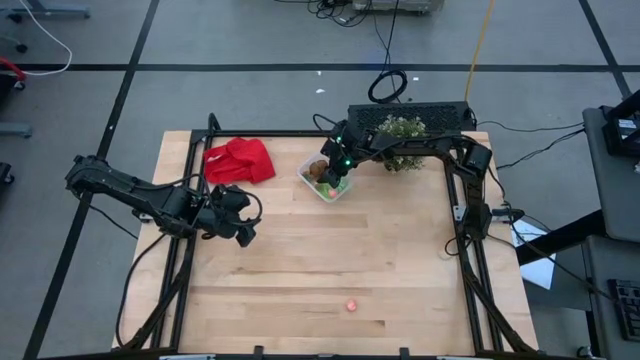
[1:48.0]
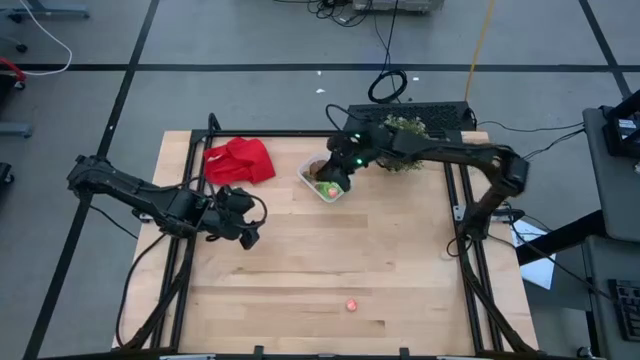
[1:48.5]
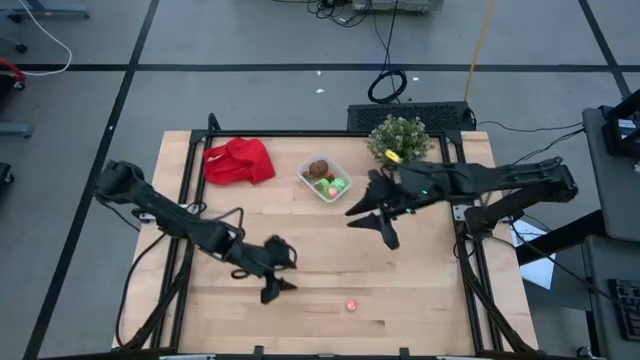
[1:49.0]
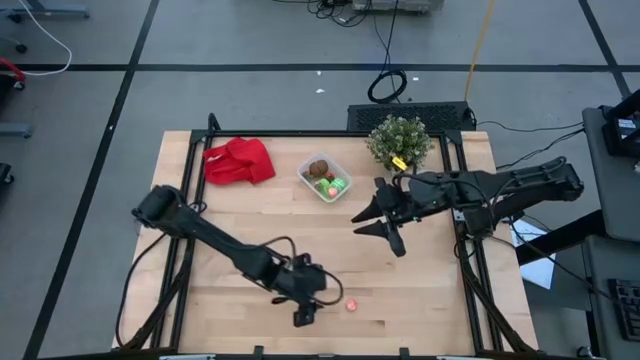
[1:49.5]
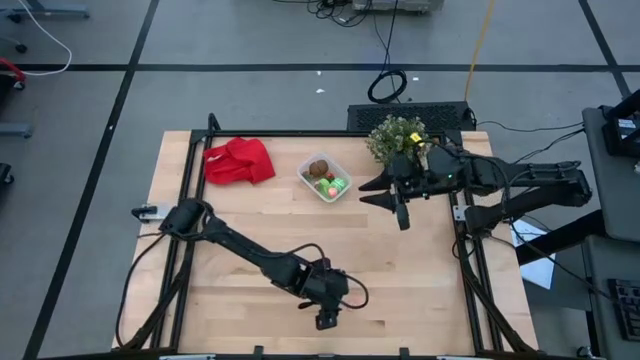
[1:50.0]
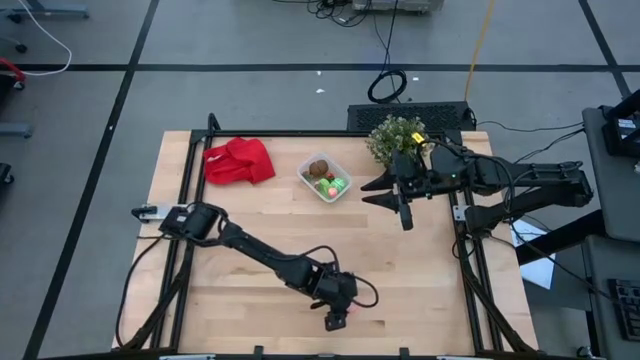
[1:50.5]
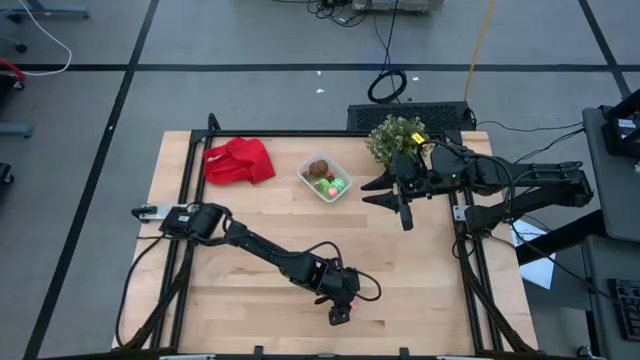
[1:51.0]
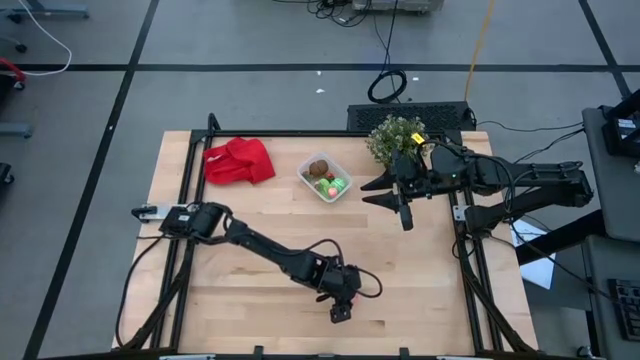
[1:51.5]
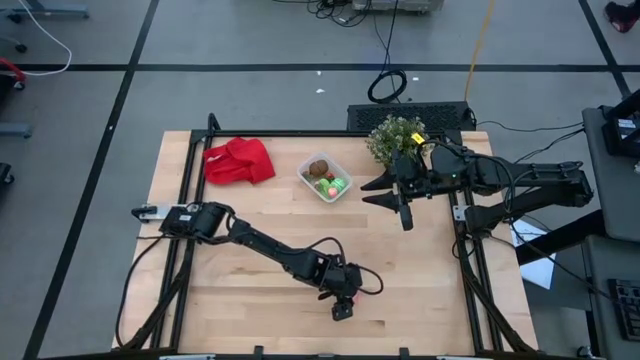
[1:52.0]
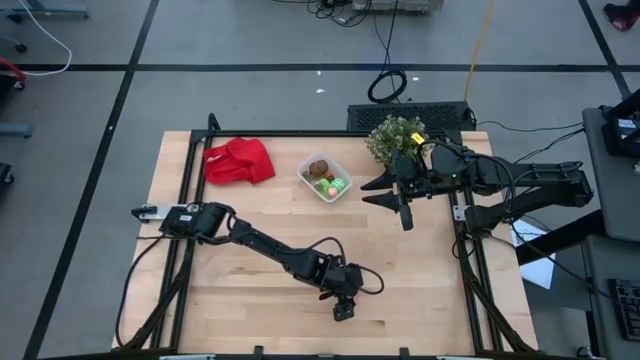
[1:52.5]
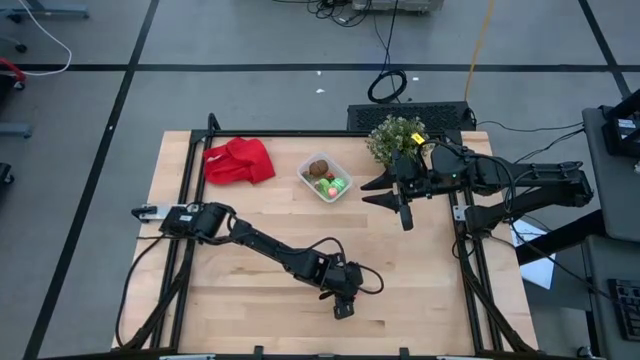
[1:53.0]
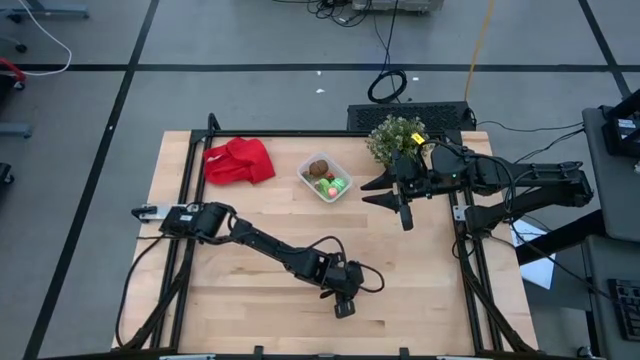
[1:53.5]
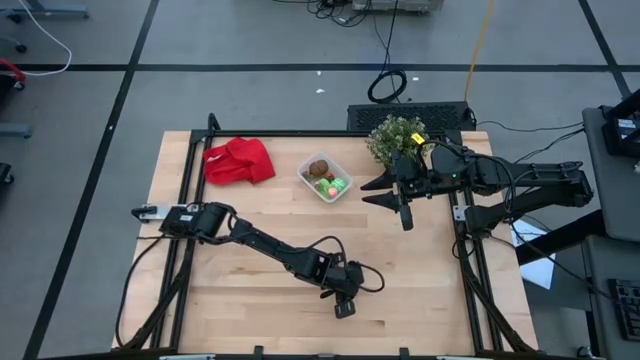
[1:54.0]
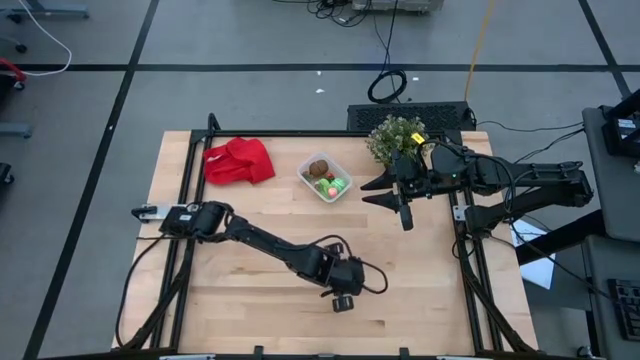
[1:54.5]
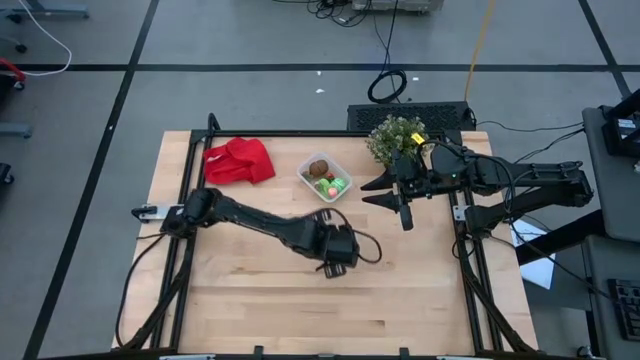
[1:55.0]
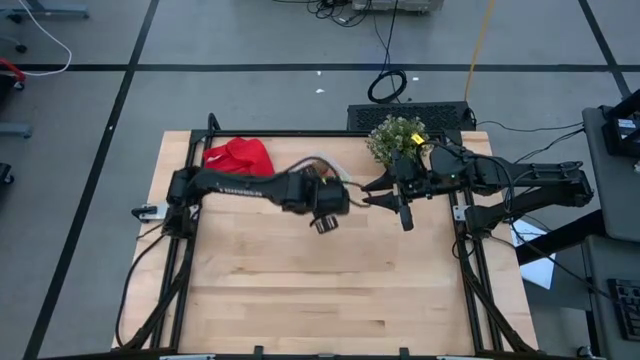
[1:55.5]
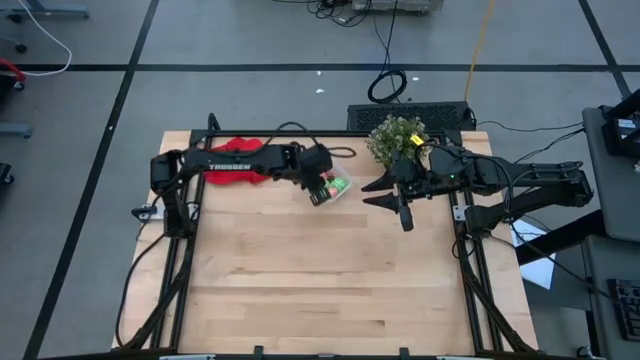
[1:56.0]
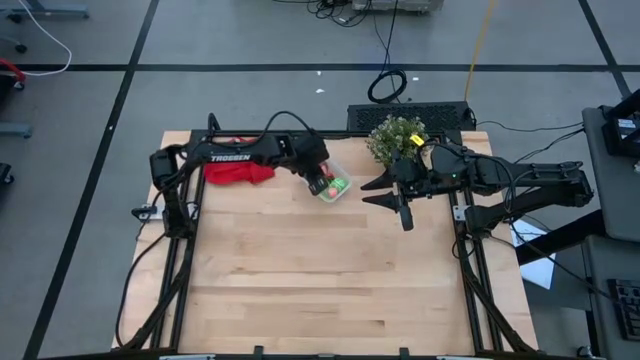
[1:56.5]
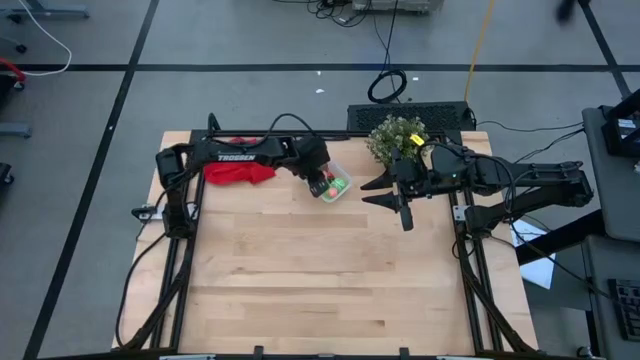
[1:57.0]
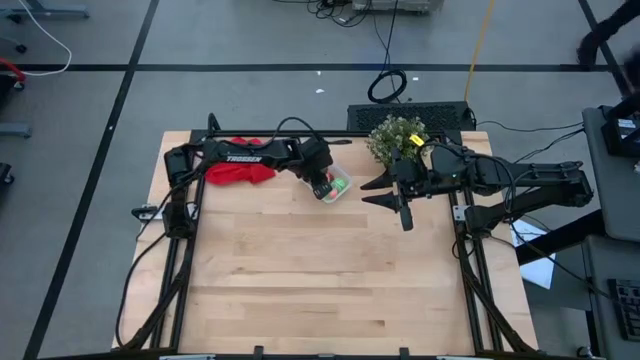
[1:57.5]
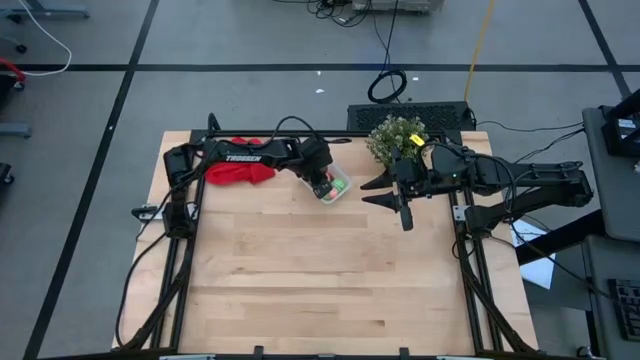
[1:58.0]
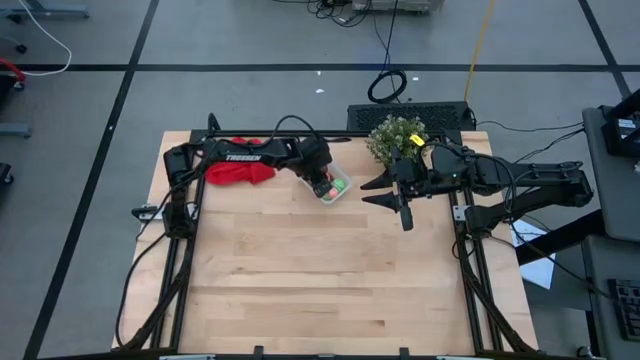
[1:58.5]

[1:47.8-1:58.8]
Task: Pick and placing Produce into tupperware
Put the pink peach into the transparent bin

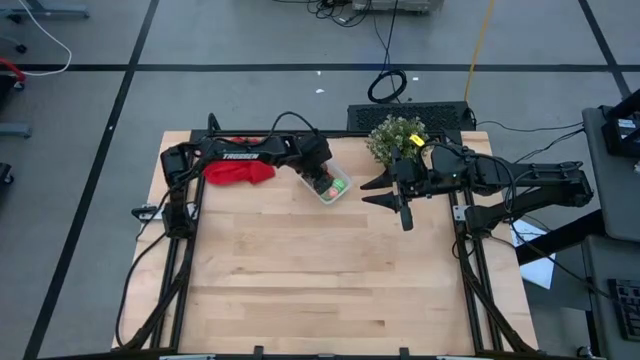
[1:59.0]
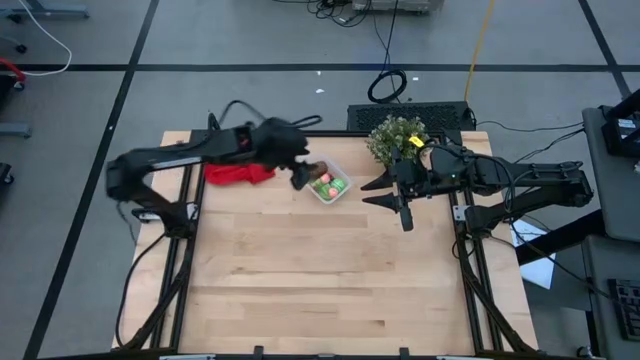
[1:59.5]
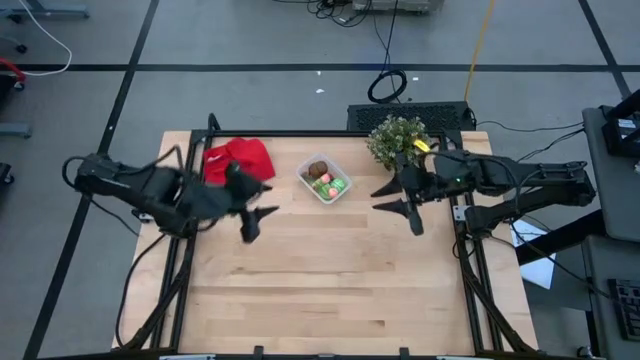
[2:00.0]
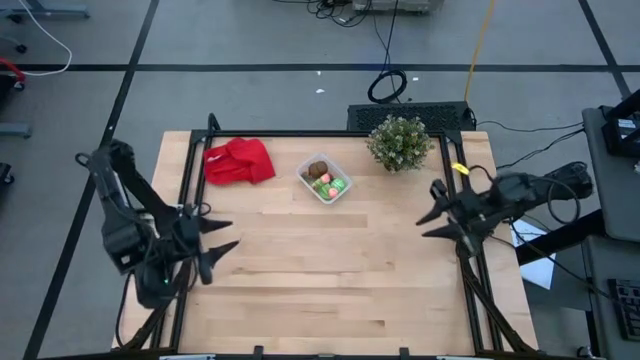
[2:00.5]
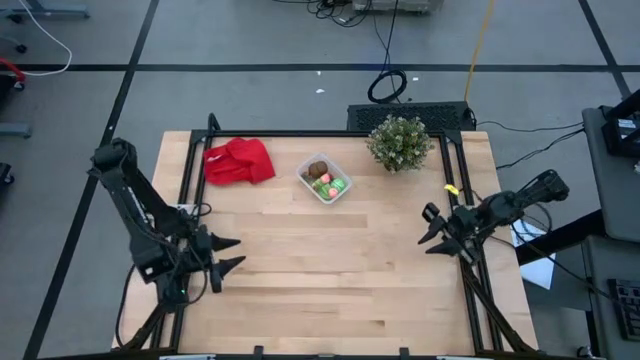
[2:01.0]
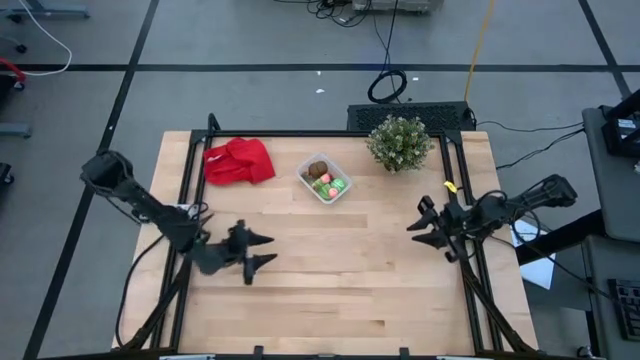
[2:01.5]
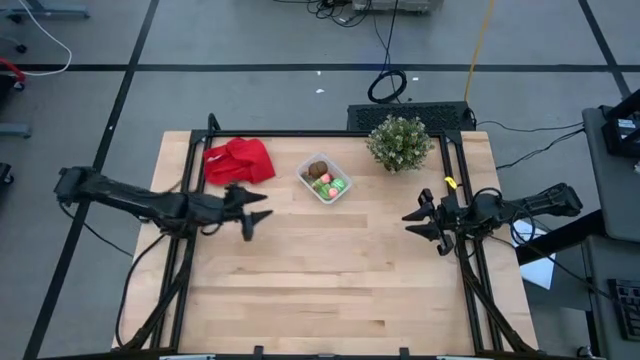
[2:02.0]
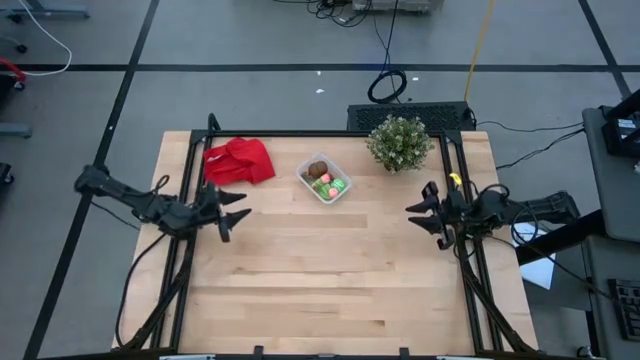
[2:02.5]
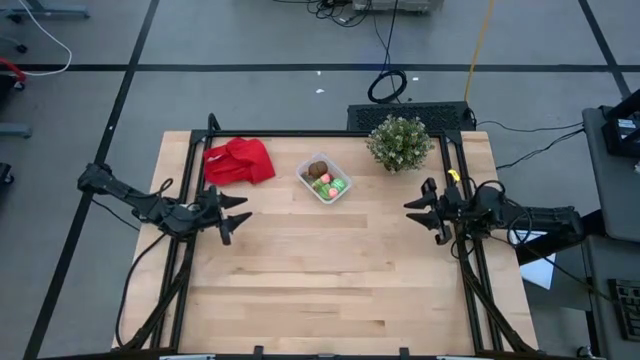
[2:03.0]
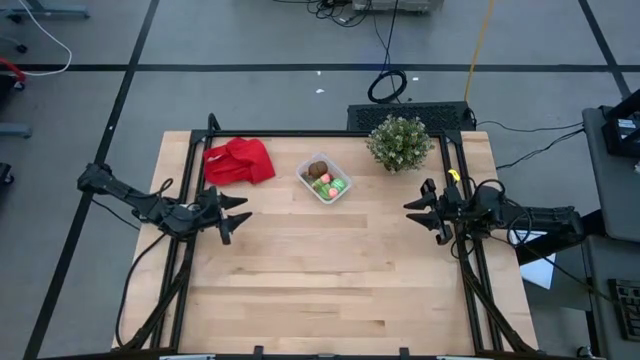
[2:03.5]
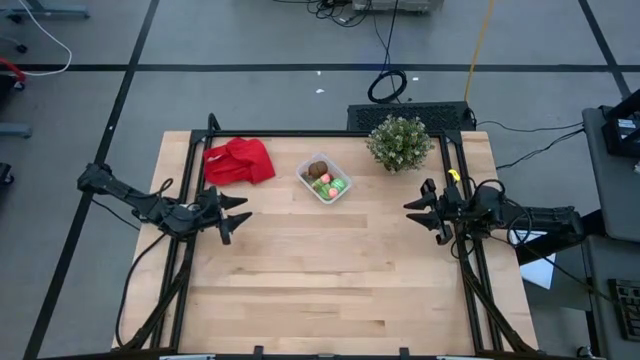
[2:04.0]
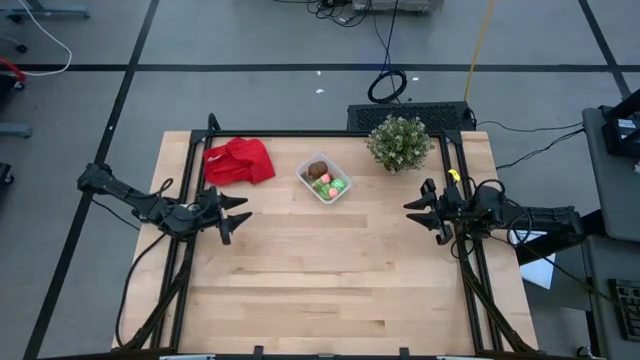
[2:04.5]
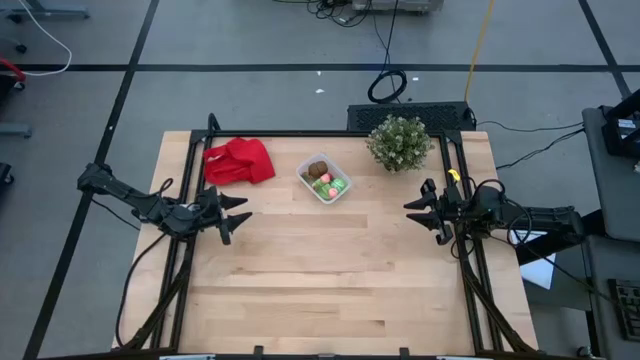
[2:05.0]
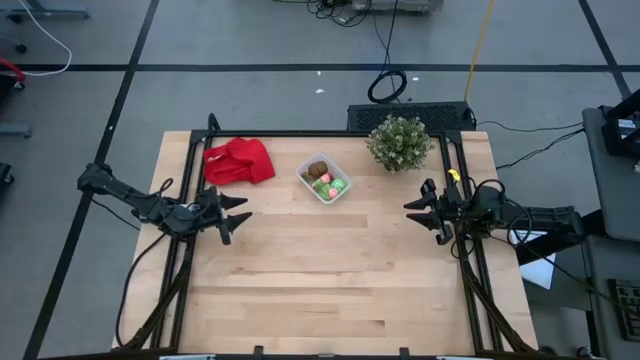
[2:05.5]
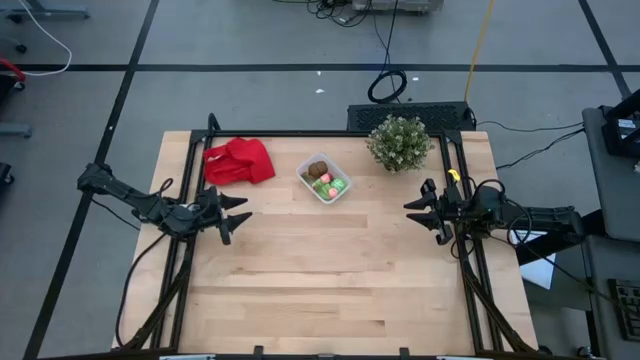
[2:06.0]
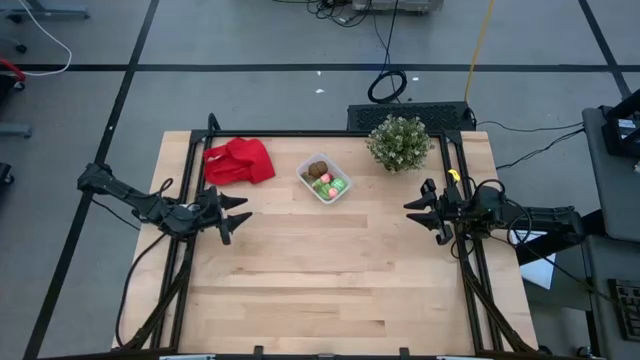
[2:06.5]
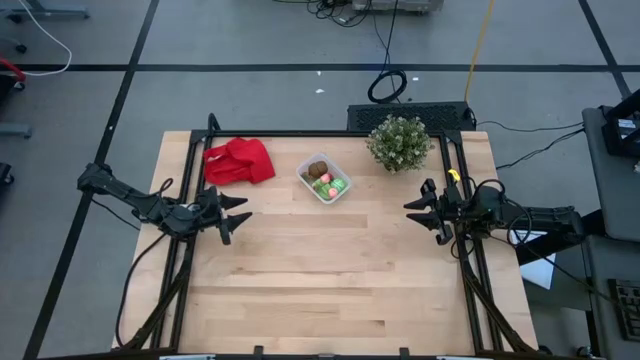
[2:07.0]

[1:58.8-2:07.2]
Return to Home Position

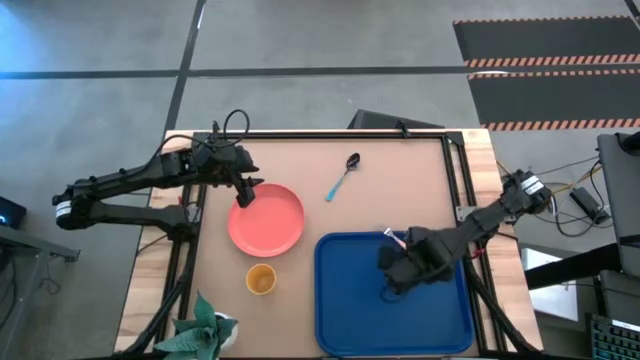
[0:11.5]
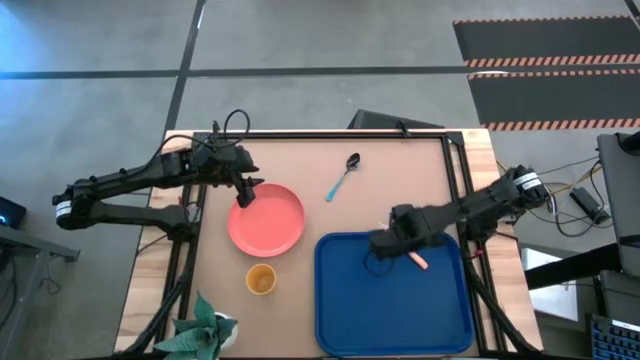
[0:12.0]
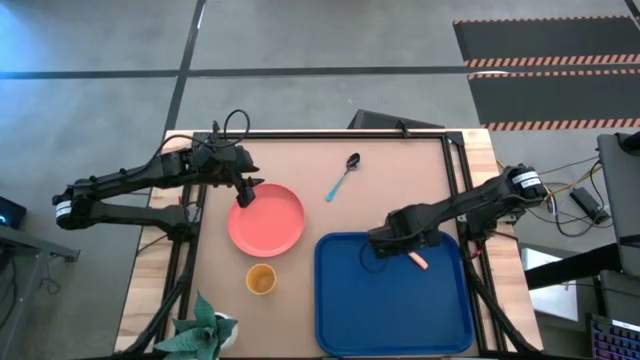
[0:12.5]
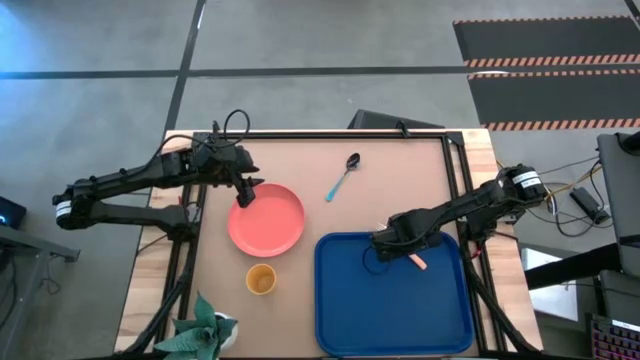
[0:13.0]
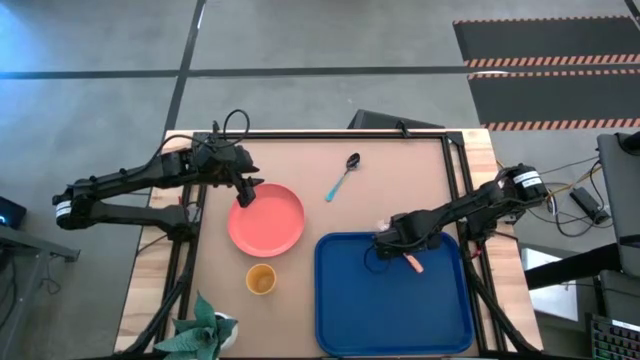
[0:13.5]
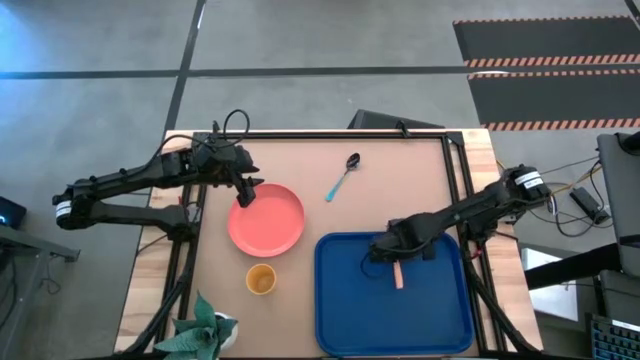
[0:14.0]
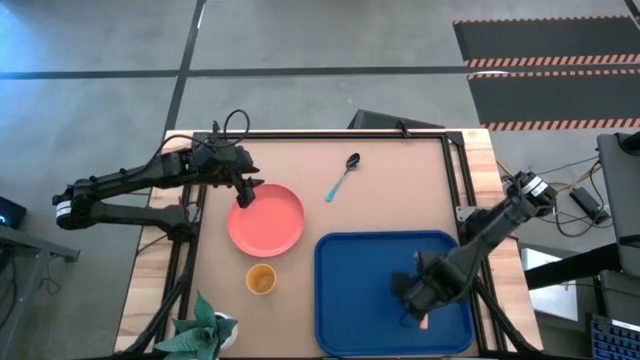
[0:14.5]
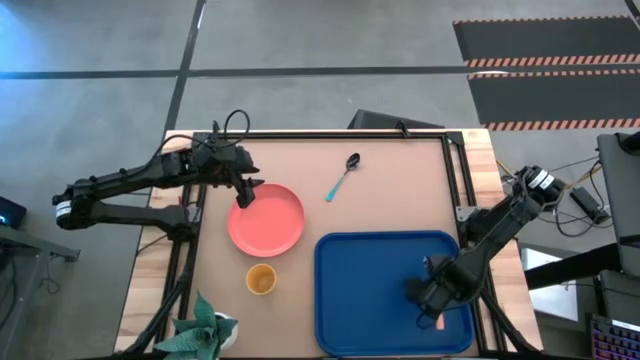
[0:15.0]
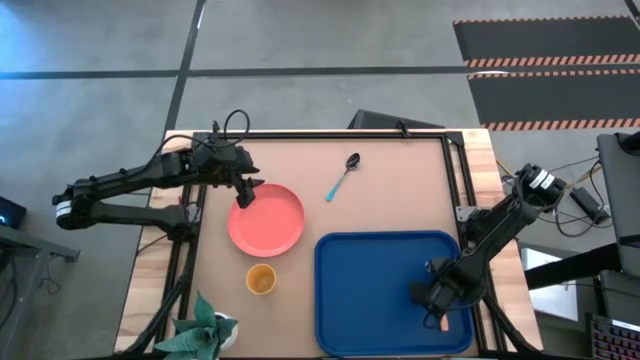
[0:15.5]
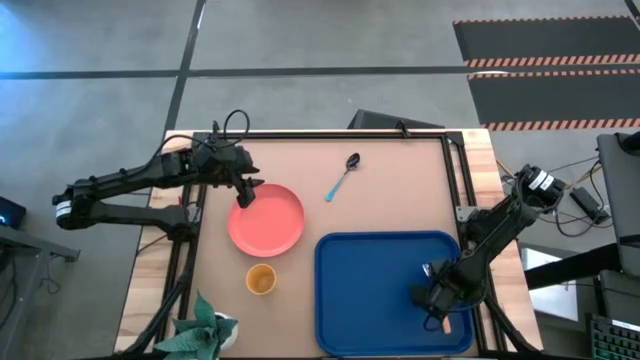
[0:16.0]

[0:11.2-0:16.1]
Task: Pick and place plate/cup/fork/spoon on tray
Put the light orange fork to the right on the blue tray
